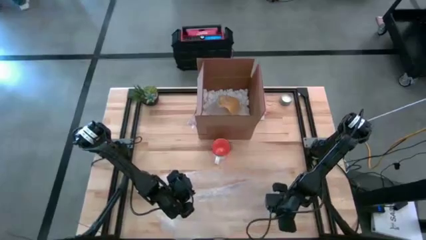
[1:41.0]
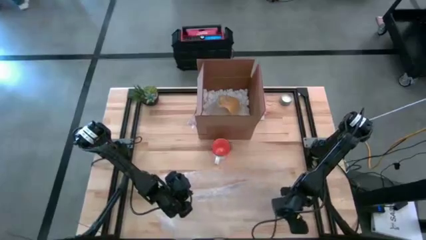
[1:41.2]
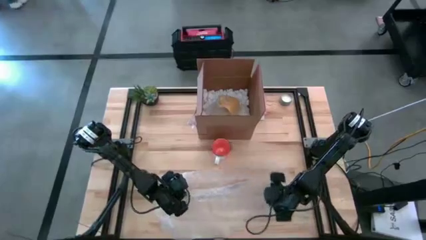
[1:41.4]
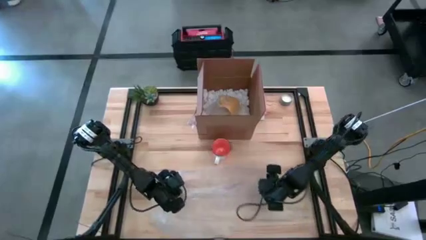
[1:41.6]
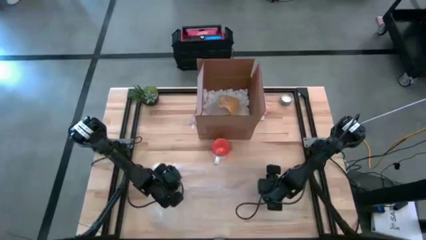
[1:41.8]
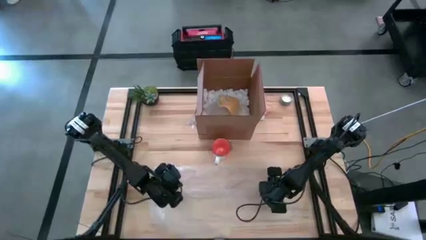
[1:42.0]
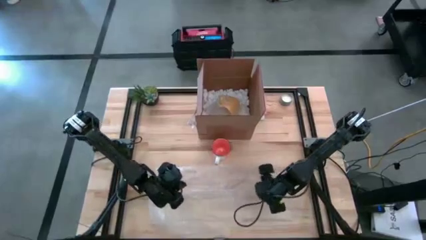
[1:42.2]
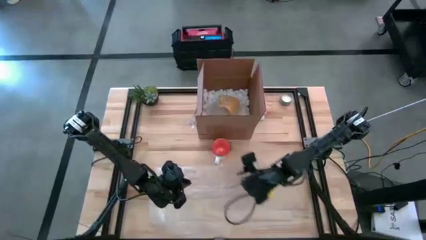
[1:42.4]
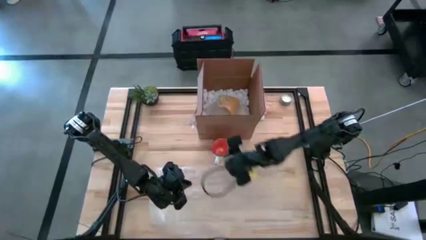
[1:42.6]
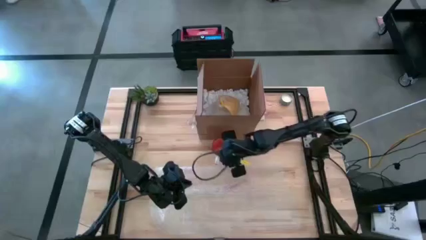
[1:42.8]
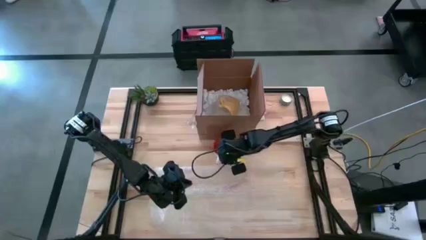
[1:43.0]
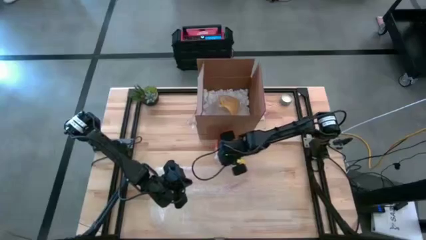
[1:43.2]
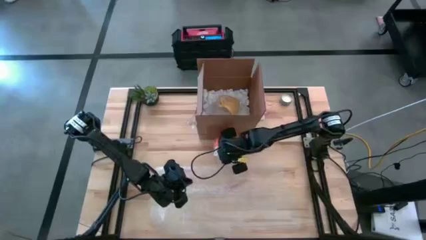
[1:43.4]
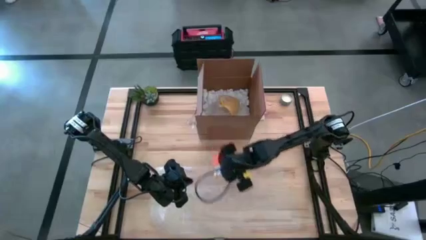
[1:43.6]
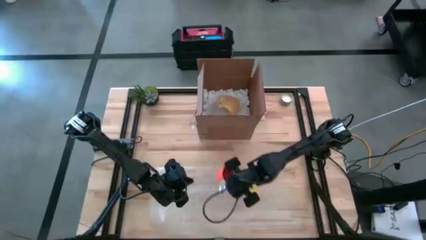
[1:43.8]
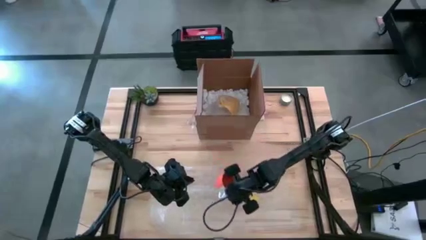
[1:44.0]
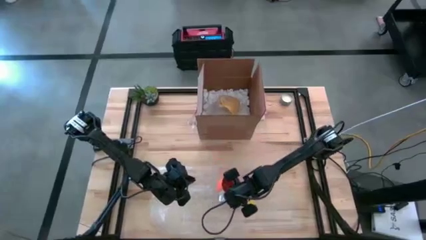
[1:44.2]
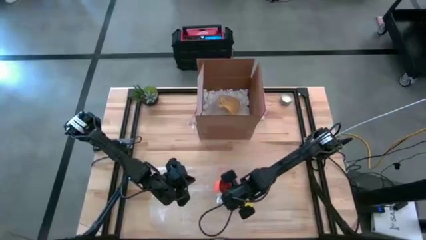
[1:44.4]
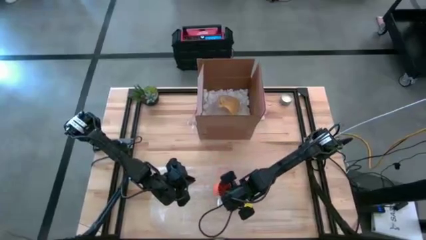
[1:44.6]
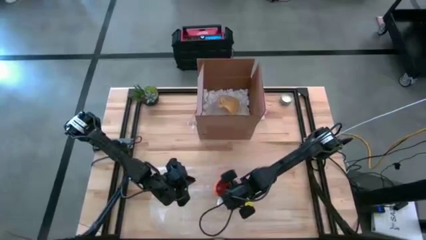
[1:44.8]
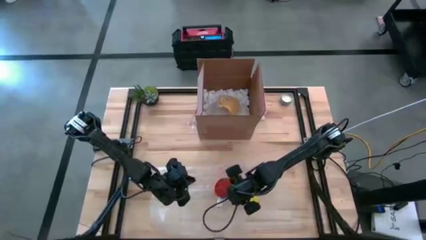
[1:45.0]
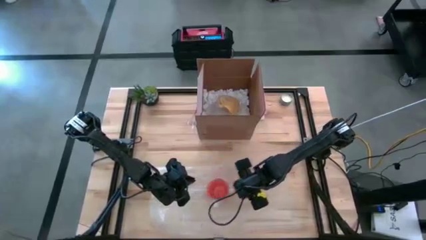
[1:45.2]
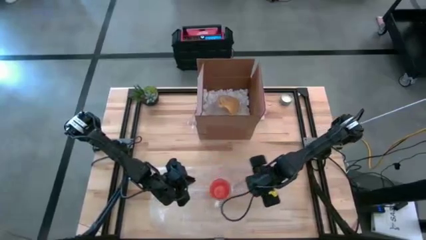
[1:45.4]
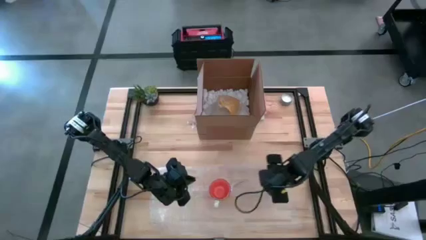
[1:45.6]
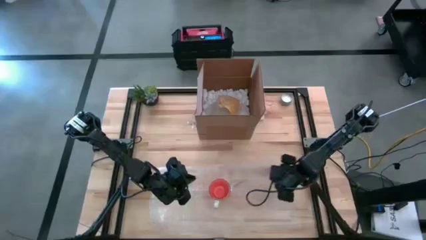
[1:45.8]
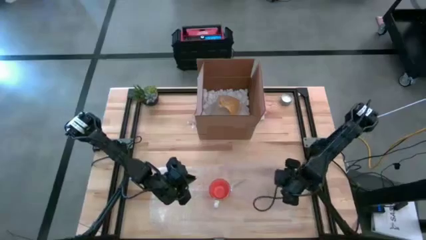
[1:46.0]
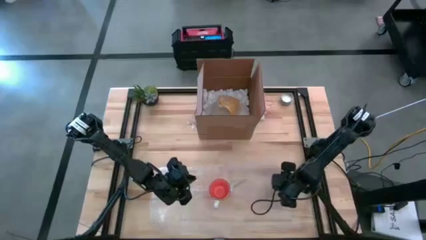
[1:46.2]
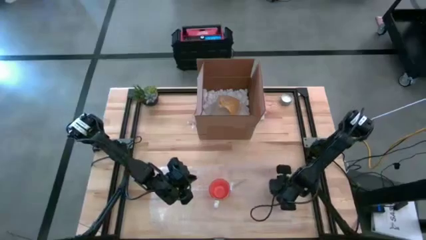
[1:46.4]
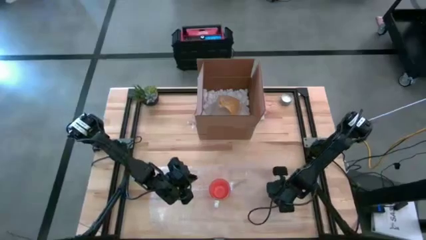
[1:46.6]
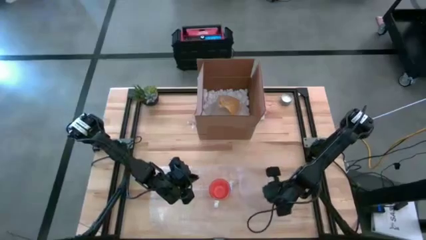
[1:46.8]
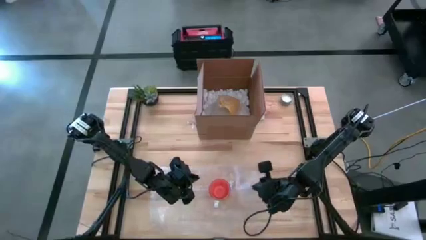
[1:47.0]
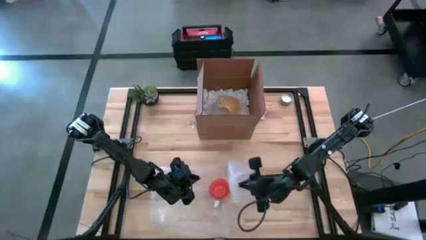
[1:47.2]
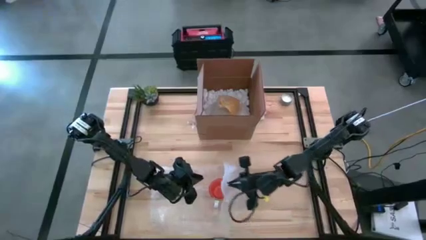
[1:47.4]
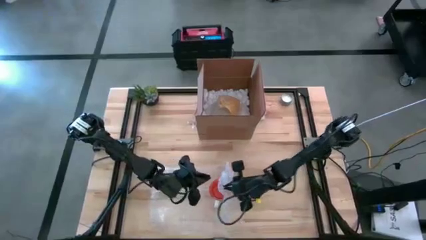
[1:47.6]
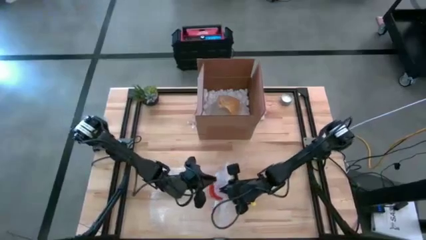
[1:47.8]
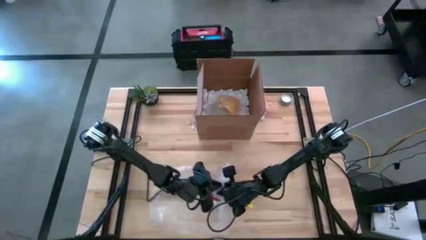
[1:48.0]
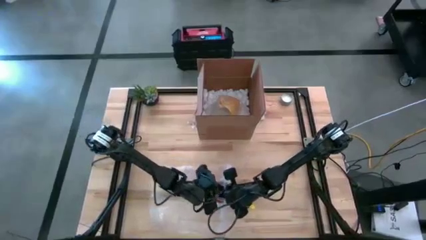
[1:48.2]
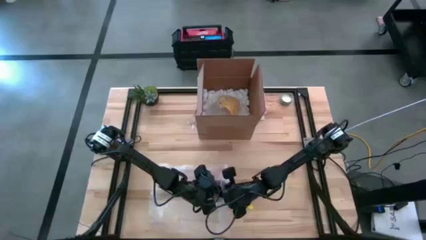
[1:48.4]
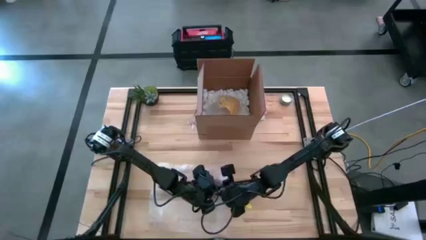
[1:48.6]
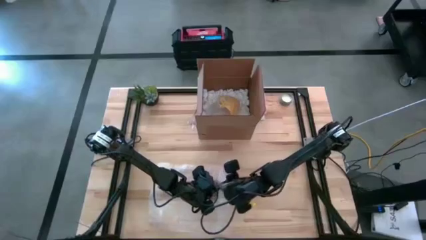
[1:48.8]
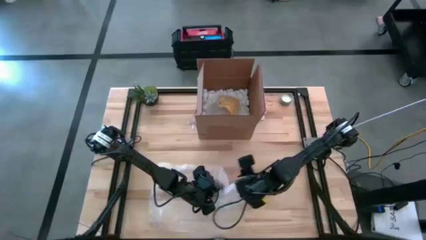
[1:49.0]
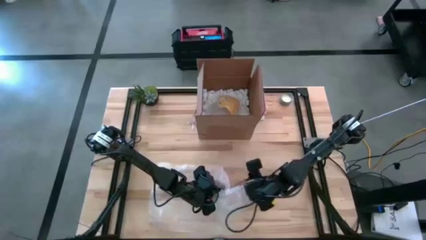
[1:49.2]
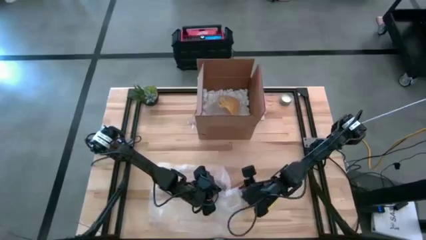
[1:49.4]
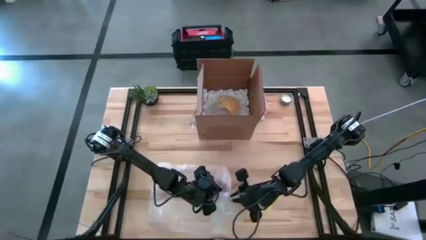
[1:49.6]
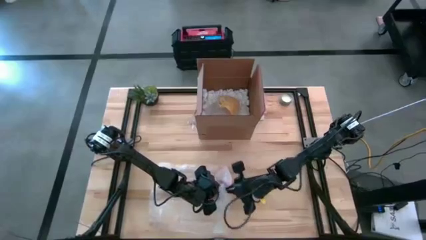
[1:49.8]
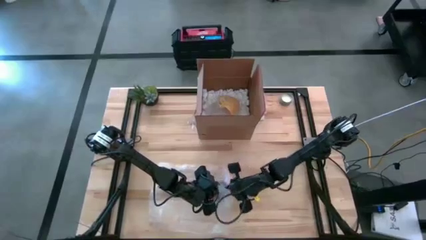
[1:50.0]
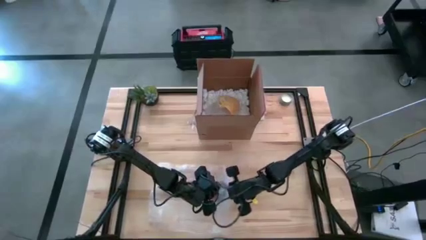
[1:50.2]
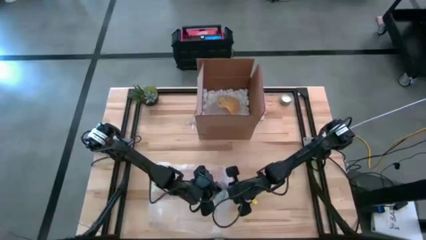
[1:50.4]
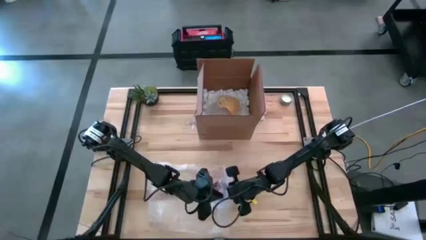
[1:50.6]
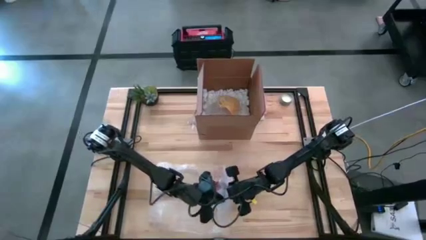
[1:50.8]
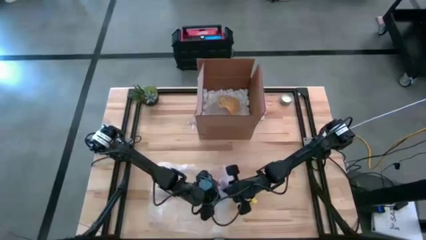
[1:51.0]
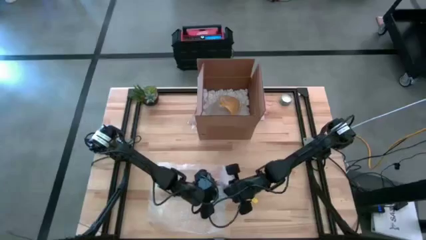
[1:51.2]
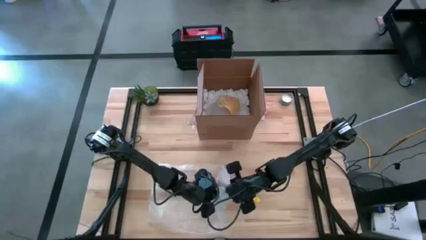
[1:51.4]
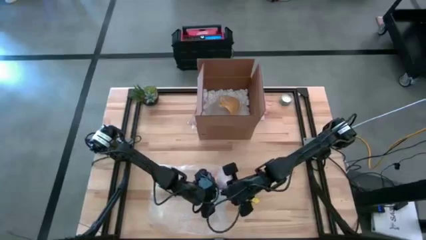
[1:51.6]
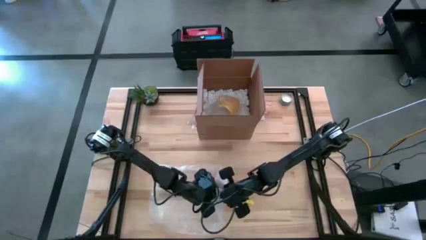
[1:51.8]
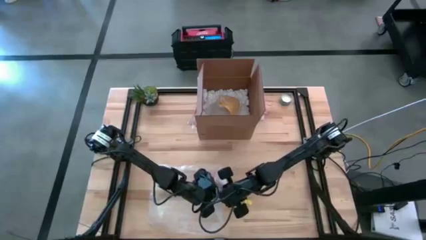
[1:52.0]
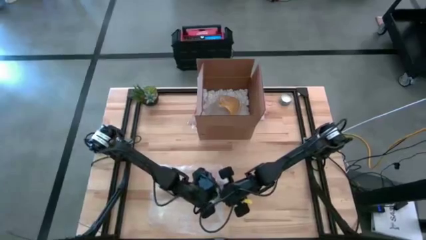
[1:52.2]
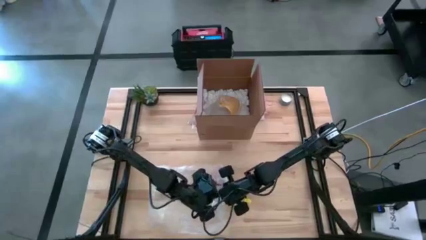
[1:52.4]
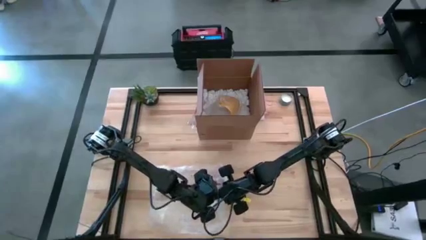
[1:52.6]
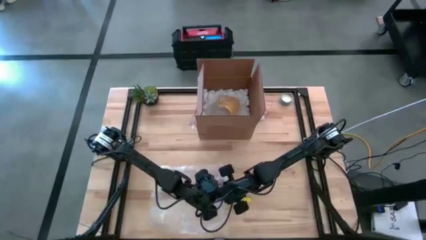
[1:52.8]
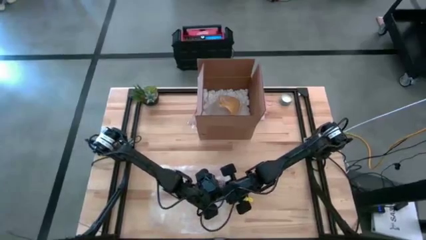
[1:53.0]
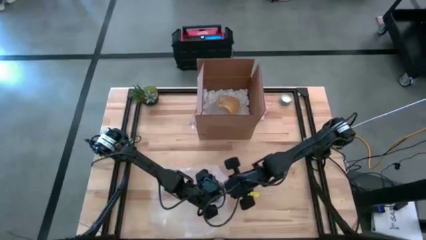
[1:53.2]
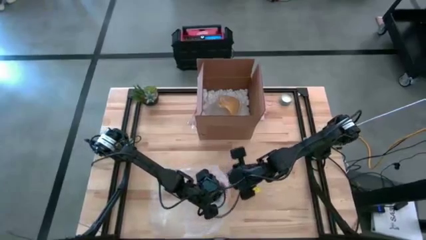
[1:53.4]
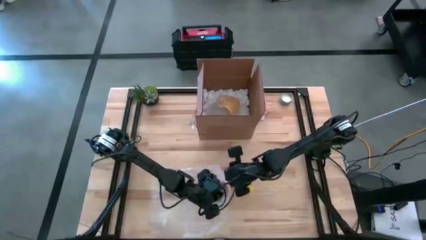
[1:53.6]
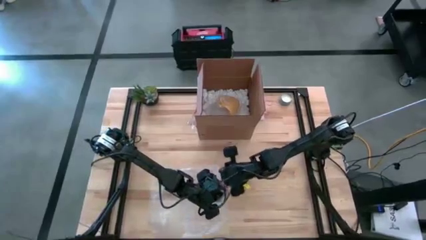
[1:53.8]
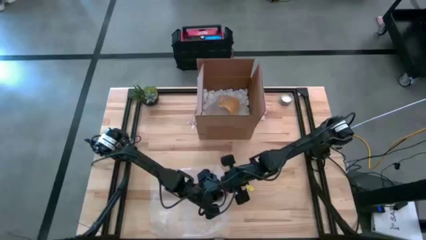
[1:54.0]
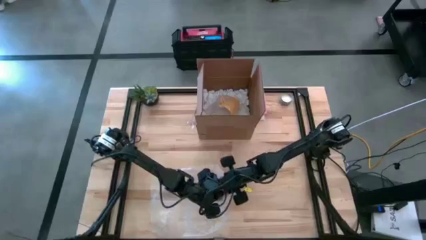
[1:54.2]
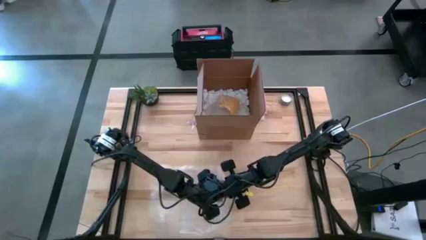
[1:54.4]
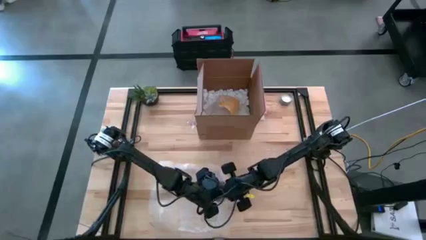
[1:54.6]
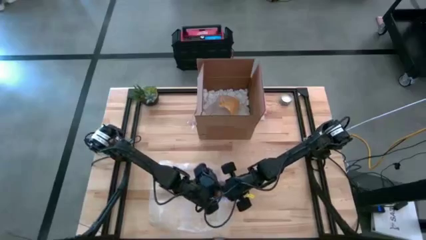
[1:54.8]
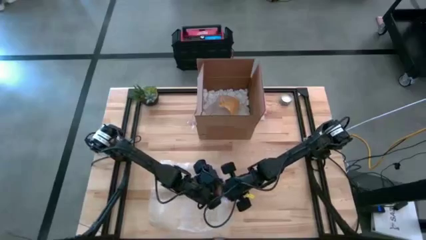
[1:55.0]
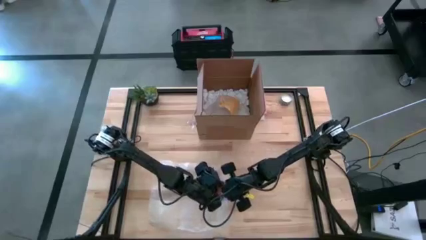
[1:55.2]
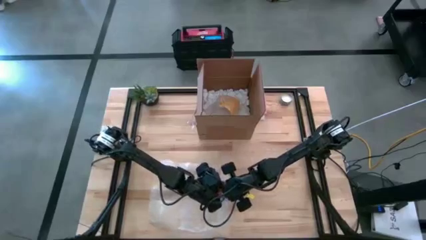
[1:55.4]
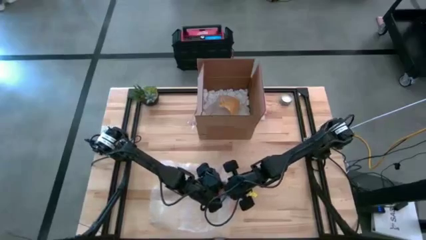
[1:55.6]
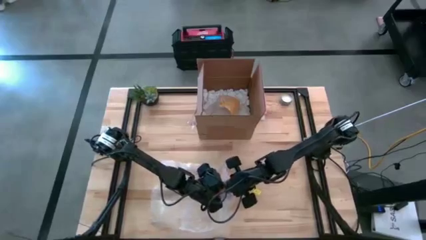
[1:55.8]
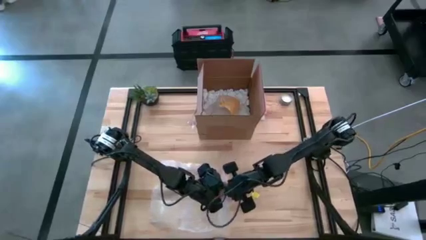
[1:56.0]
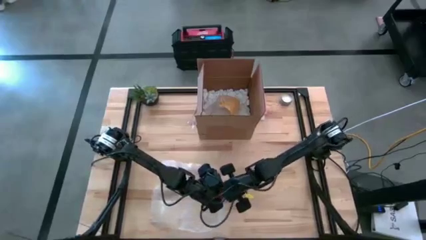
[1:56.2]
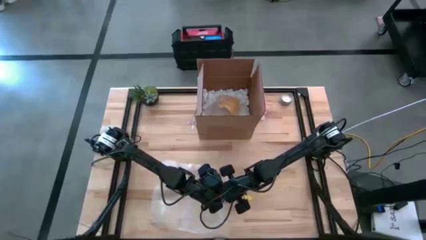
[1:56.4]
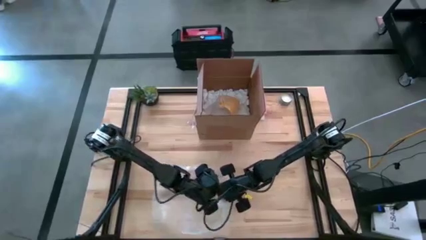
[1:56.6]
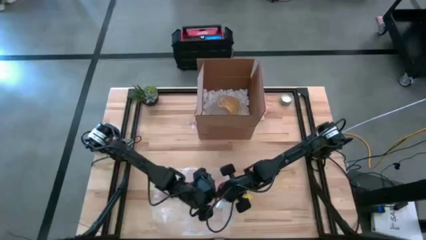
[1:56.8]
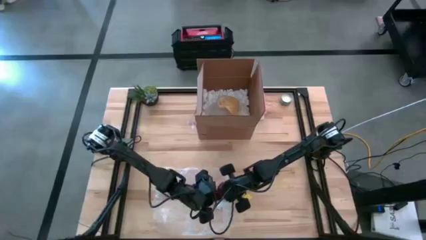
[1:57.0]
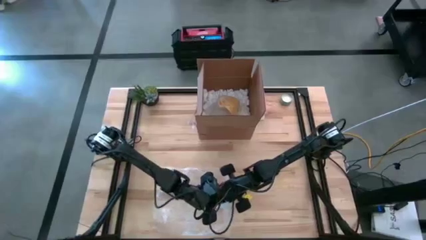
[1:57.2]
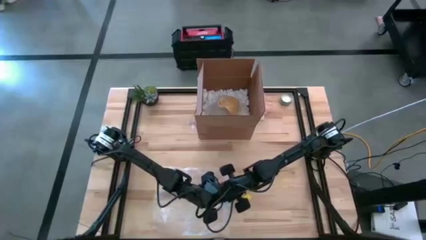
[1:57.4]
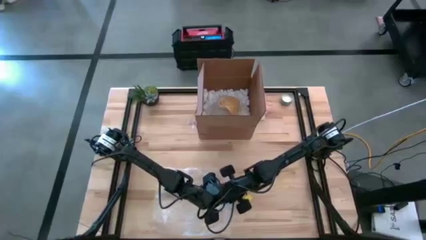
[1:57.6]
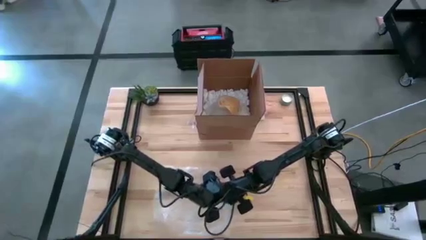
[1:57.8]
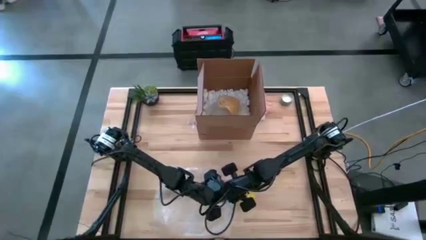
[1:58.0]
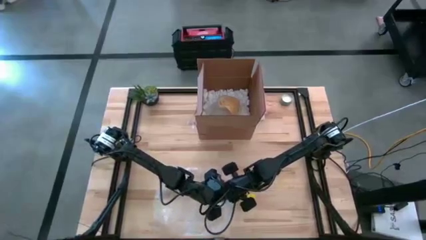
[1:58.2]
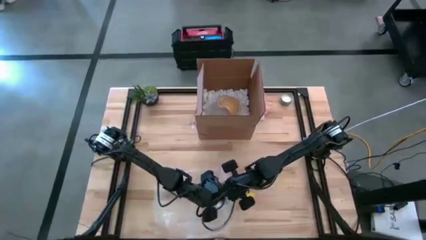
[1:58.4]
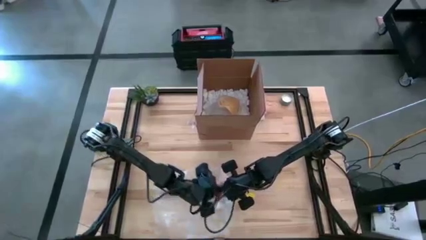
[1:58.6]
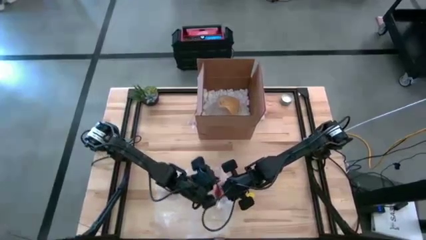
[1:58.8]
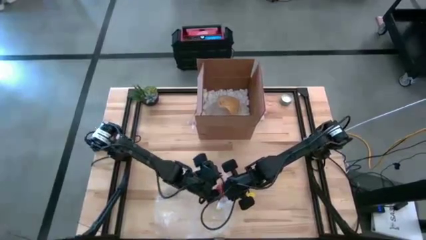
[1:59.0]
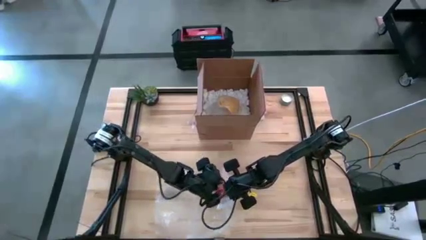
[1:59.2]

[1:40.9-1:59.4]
Task: wrap mug
Wrap the orange mug with the transparent bubble wrap
